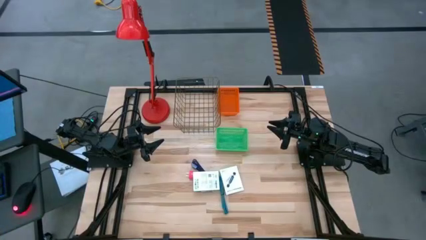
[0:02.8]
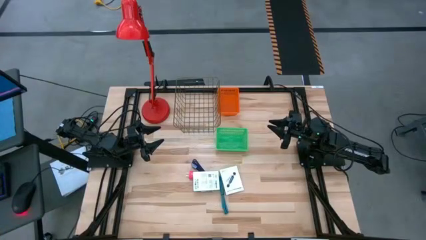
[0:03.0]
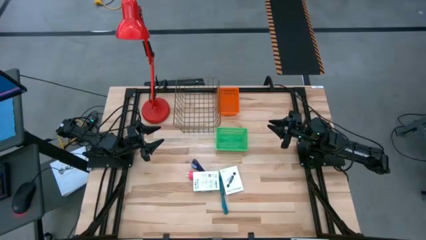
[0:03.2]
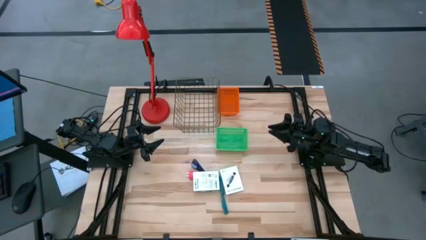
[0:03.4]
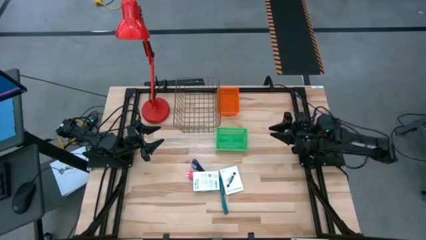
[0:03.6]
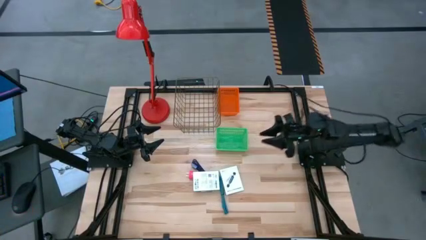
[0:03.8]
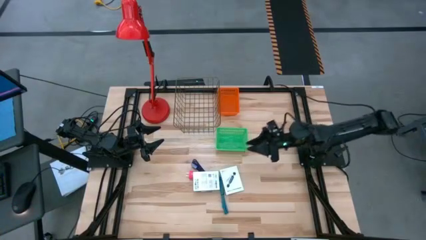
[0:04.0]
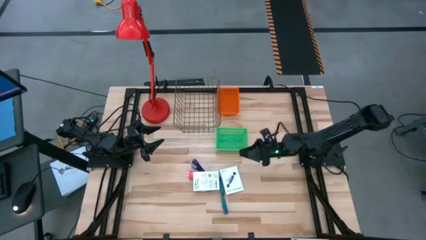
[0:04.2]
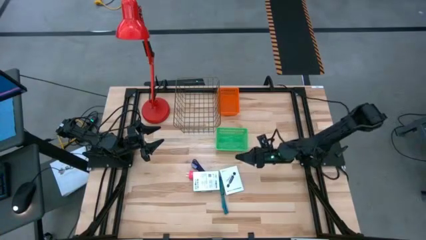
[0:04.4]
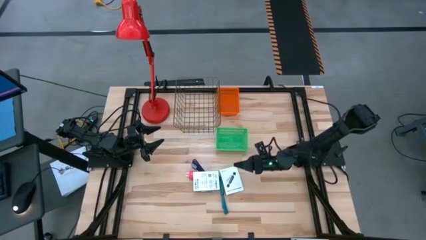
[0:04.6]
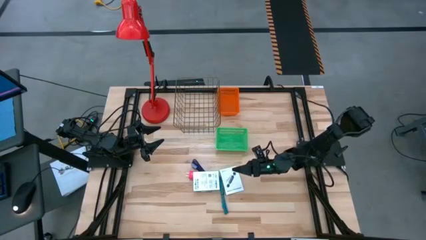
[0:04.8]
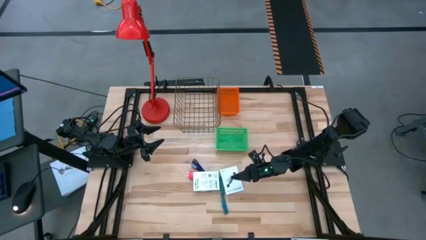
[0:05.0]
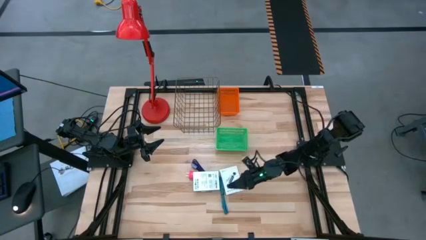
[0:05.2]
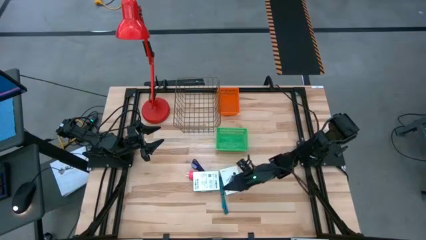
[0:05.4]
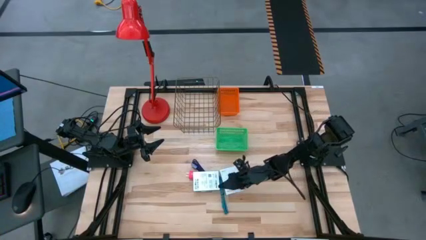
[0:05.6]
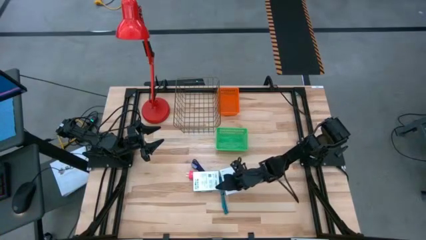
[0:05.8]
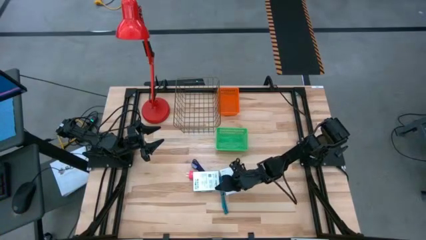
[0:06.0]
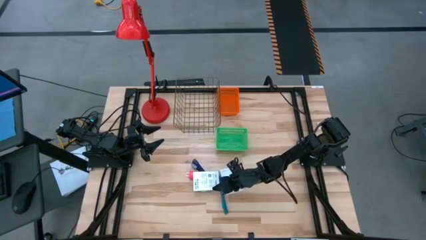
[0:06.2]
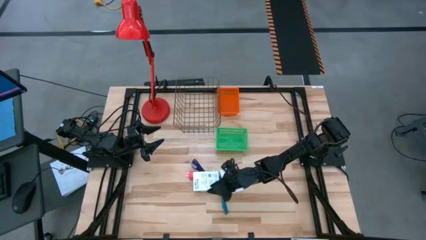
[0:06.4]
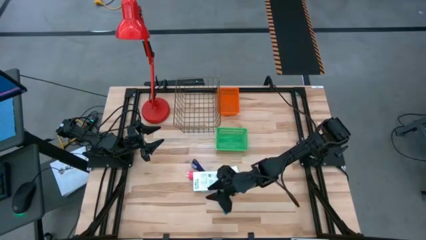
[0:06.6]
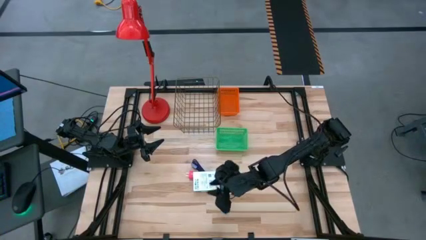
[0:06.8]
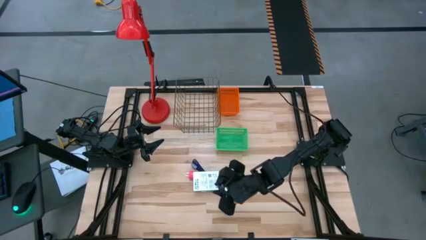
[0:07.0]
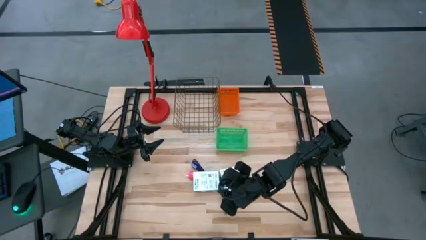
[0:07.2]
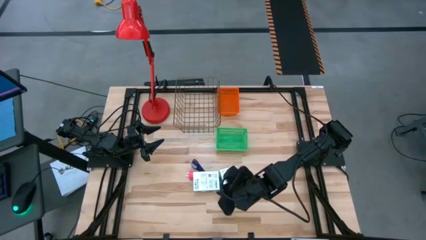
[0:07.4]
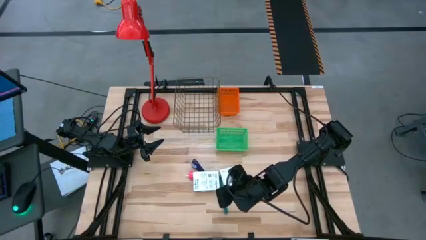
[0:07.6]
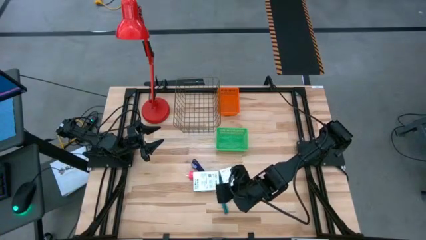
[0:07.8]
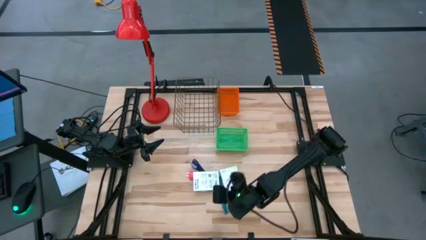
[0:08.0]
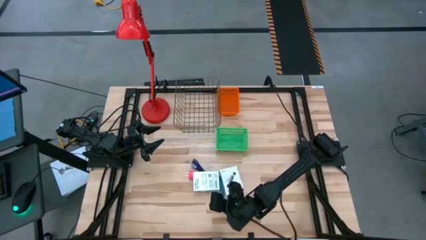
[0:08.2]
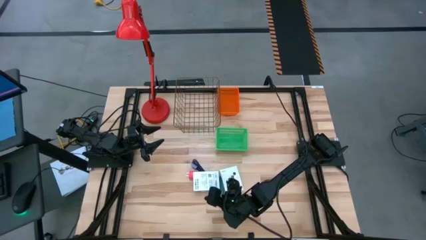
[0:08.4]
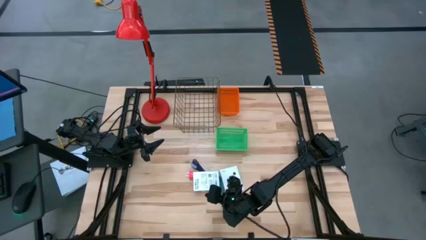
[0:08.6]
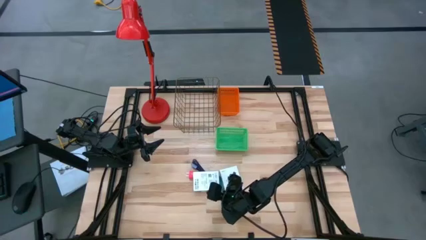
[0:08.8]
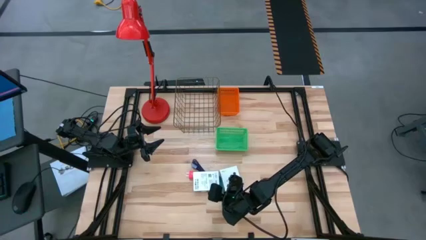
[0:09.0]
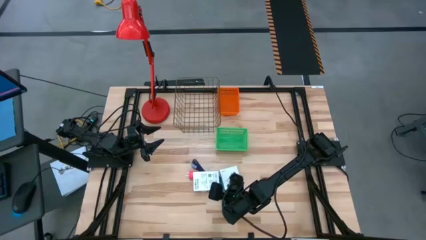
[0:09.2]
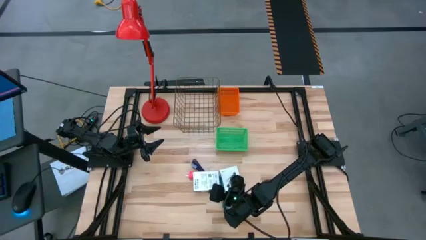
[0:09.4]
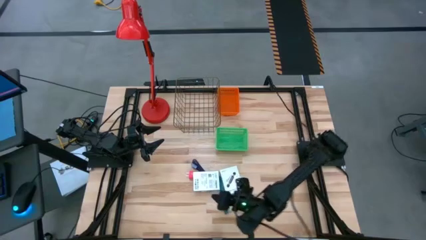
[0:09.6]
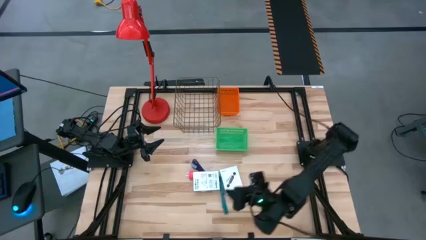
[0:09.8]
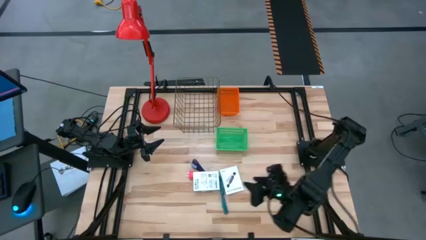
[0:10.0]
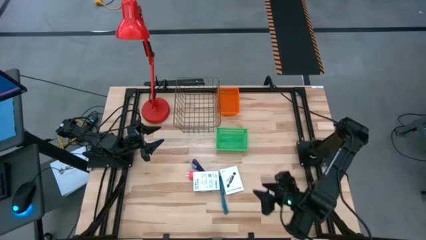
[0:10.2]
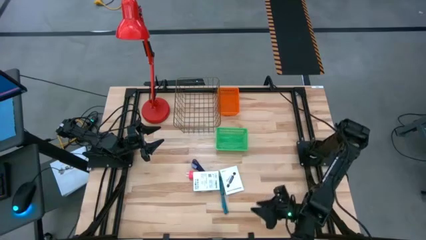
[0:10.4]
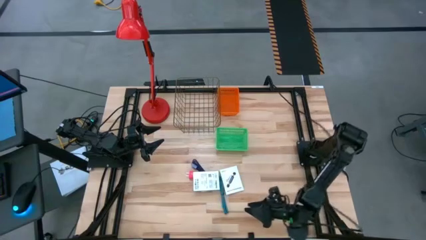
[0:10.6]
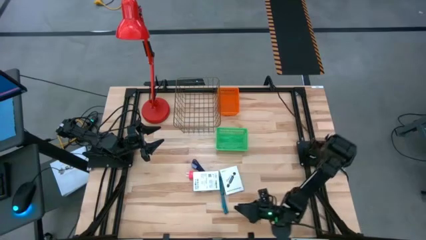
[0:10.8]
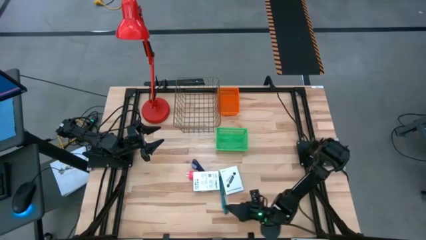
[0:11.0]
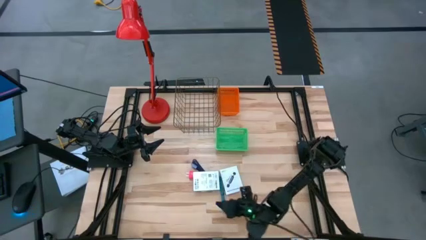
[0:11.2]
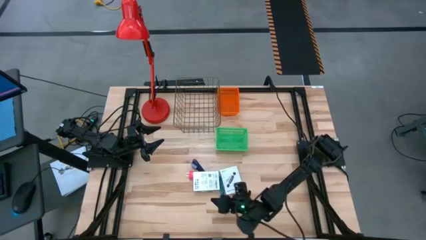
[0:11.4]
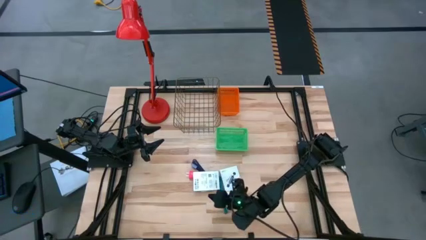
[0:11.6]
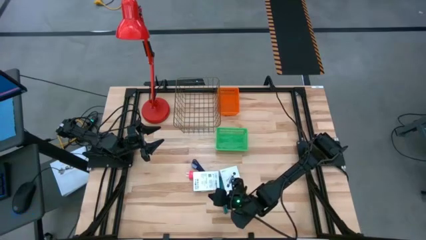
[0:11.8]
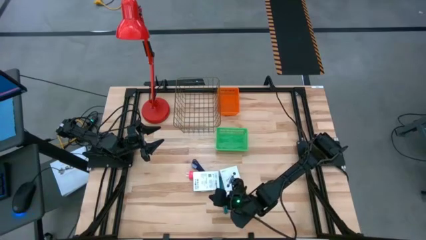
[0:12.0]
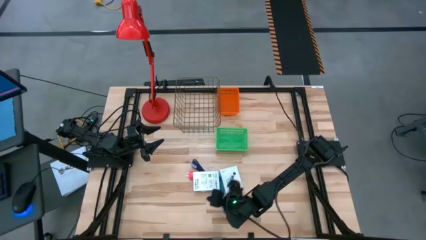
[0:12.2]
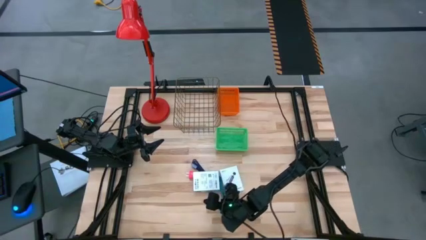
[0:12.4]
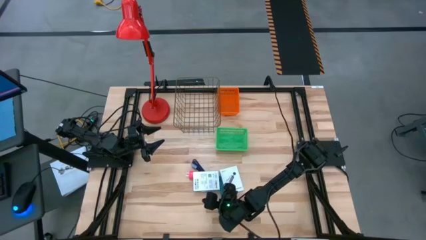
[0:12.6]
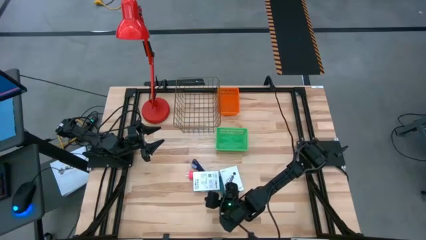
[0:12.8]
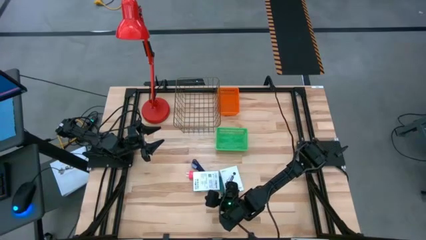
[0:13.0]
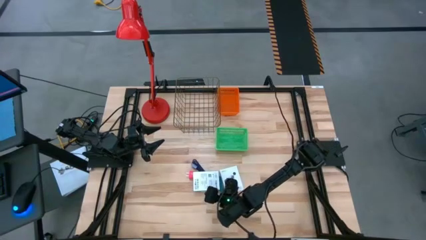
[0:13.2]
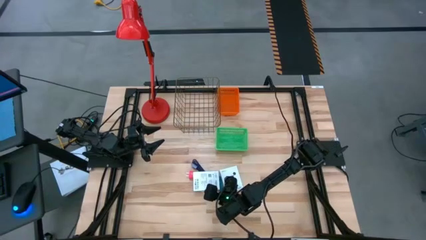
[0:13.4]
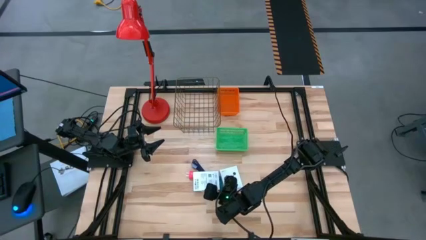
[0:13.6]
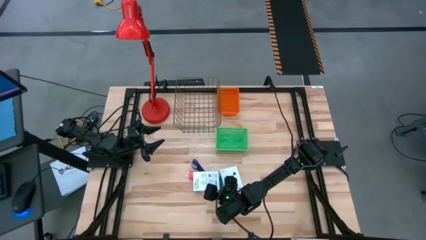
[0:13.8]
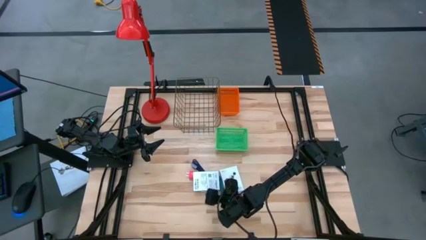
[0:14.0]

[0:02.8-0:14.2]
Task: Pick and place items into bin
Put the left card reader box into the green bin

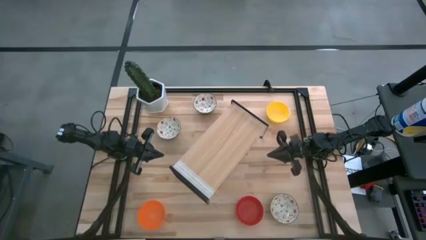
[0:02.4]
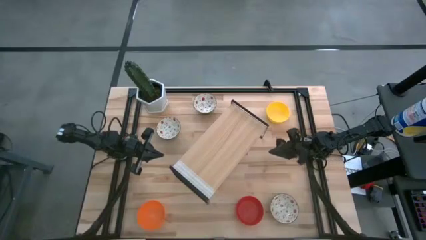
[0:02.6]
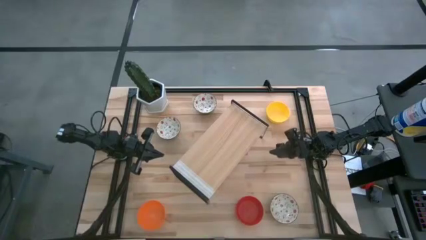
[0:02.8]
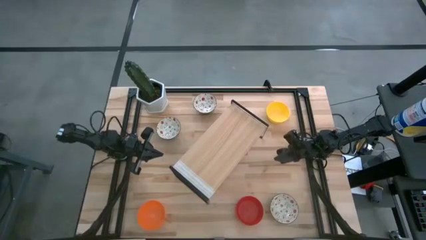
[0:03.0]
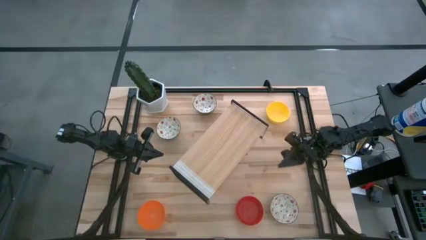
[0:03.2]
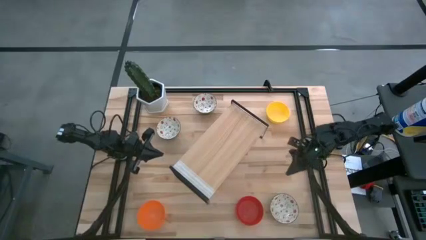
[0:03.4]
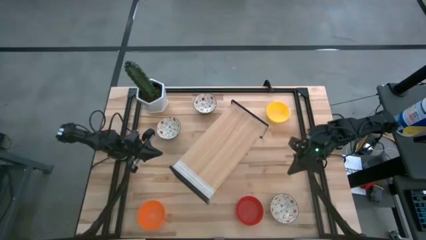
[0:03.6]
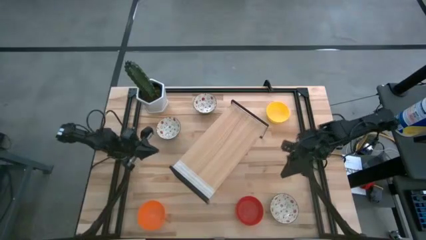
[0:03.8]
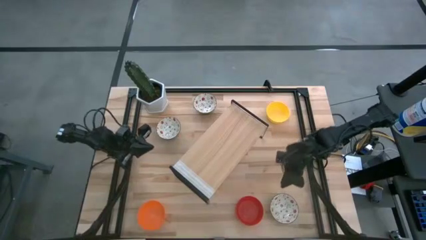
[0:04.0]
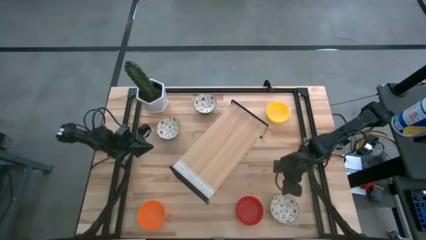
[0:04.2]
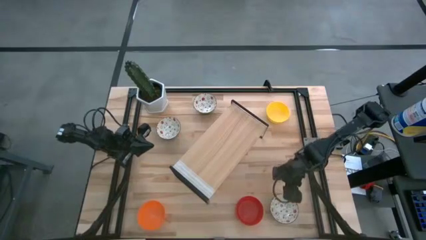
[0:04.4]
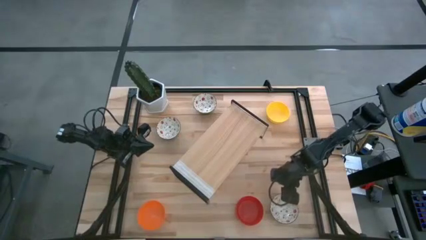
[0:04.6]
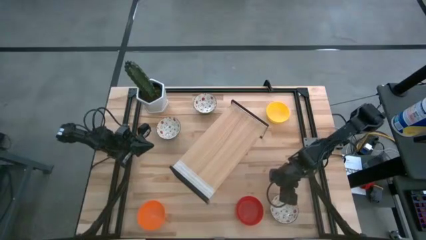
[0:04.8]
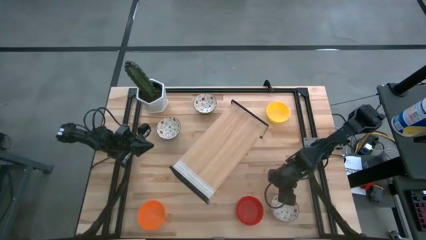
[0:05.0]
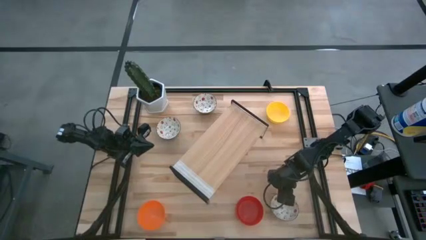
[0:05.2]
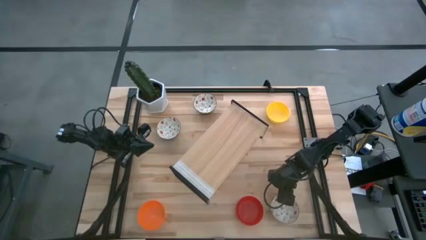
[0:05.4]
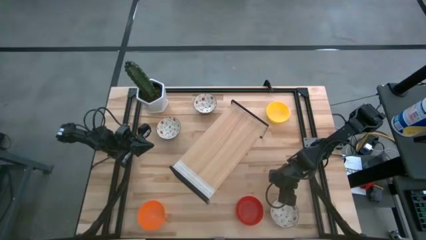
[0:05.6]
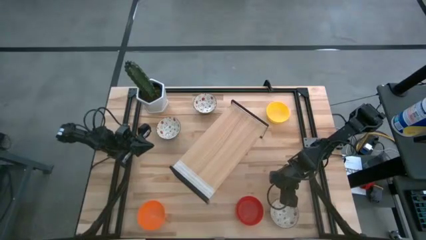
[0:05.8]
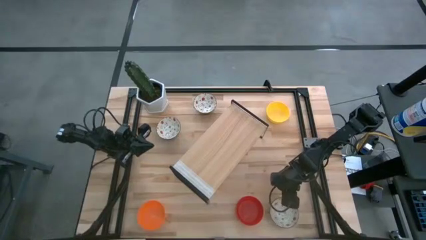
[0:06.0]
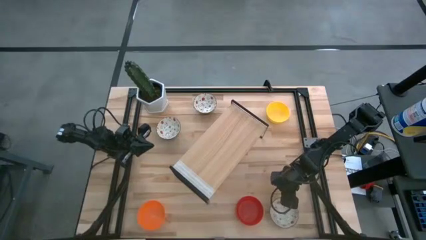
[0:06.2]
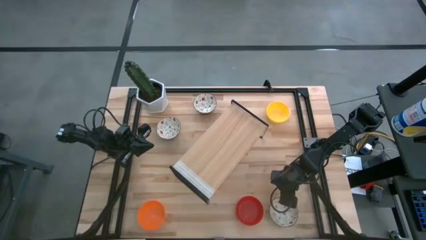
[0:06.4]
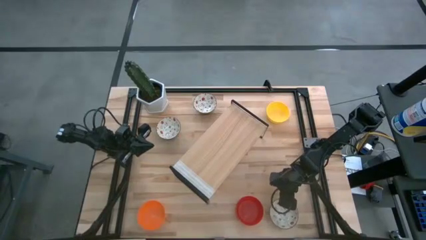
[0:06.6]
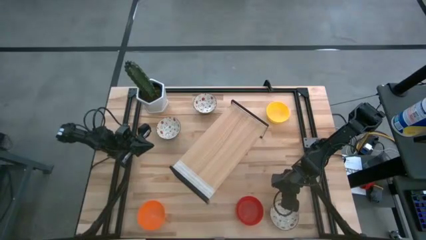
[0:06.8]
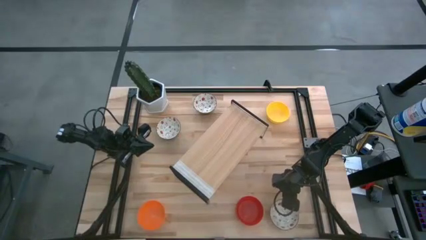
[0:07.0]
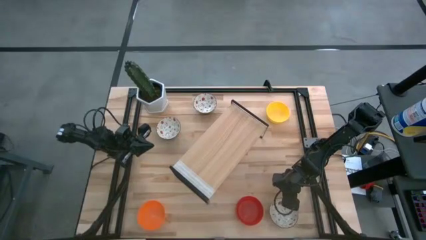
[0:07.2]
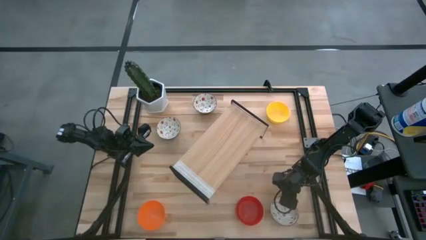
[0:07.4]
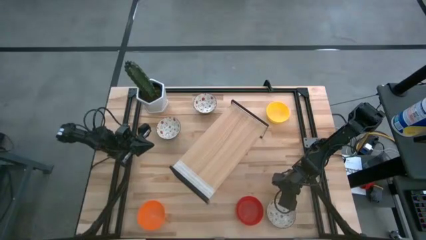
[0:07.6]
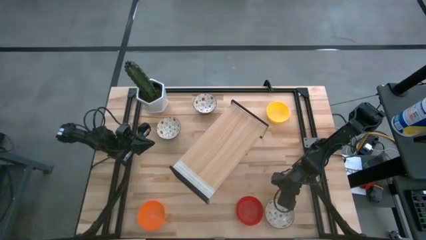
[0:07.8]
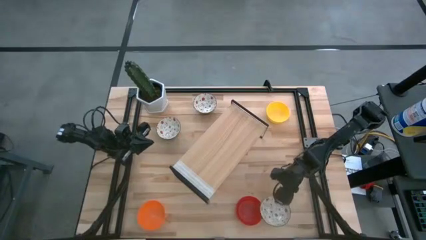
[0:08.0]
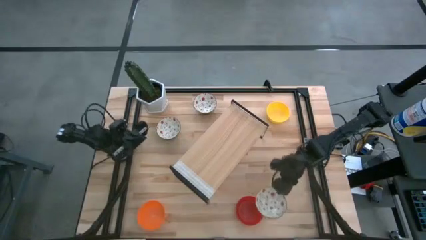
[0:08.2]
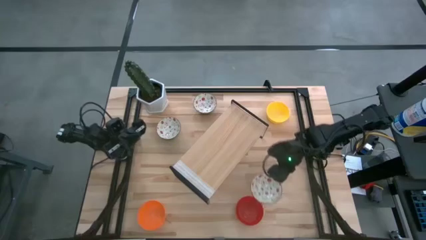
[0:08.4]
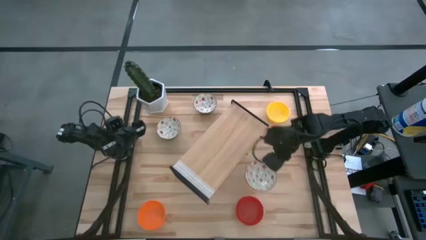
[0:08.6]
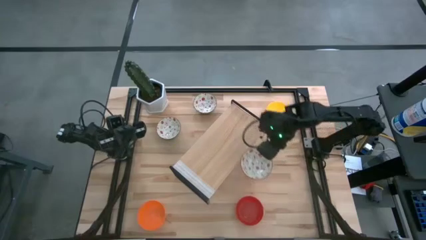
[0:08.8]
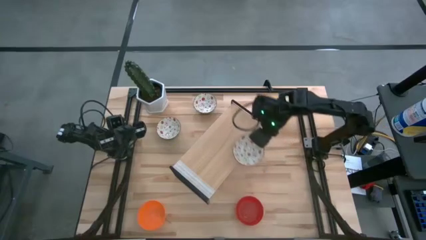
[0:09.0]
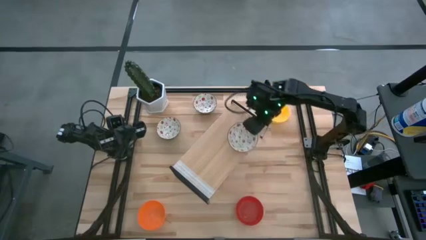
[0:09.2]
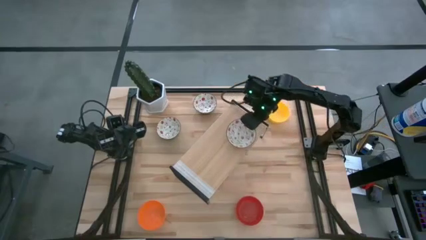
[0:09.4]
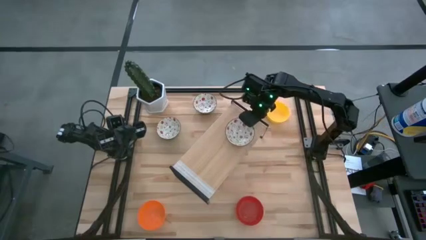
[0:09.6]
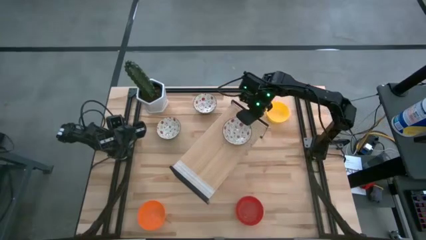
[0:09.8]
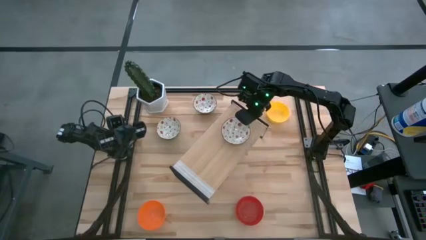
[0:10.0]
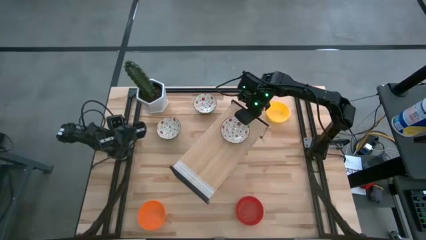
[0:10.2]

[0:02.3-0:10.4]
Task: Pick & Place Mini bowls
Put the bottom right white patterned bowl on the shelf
